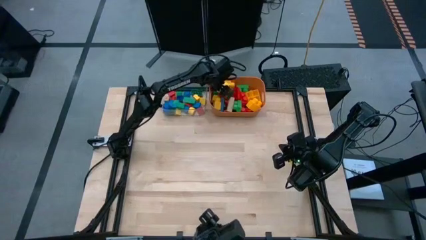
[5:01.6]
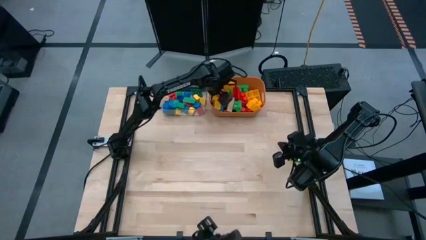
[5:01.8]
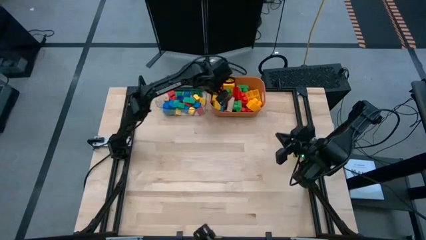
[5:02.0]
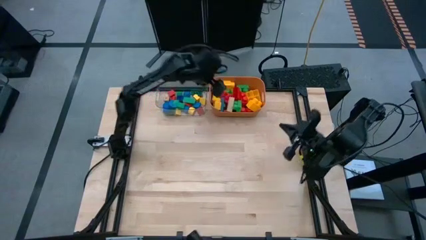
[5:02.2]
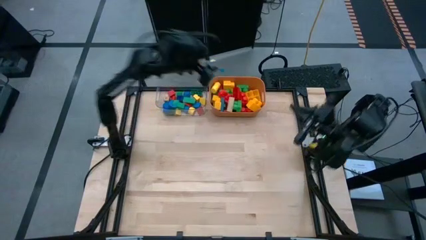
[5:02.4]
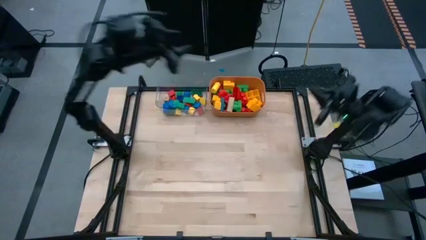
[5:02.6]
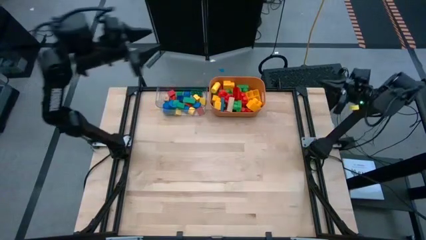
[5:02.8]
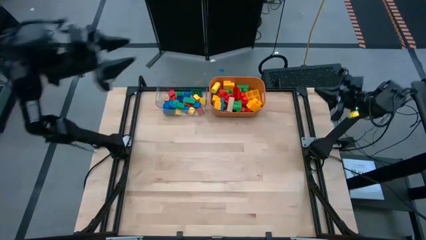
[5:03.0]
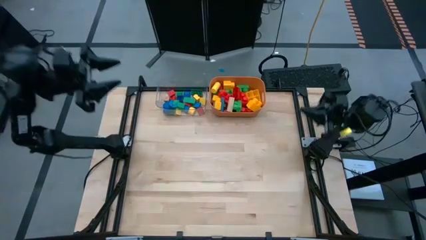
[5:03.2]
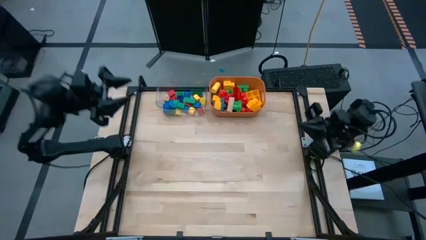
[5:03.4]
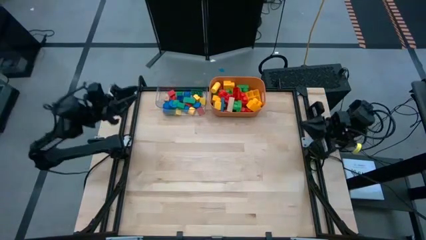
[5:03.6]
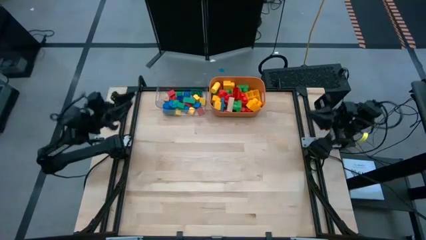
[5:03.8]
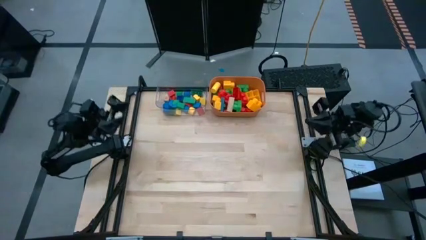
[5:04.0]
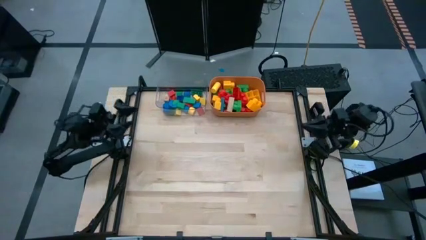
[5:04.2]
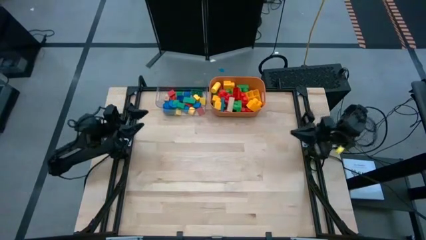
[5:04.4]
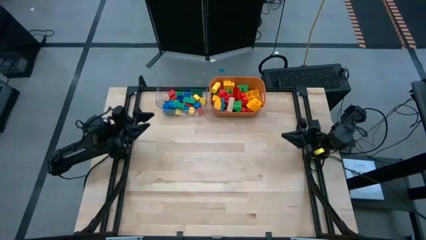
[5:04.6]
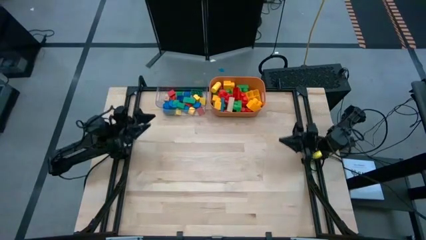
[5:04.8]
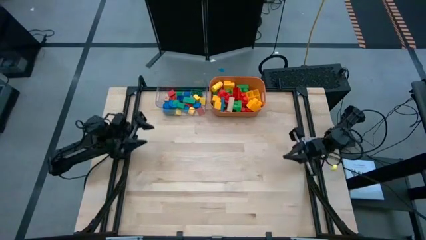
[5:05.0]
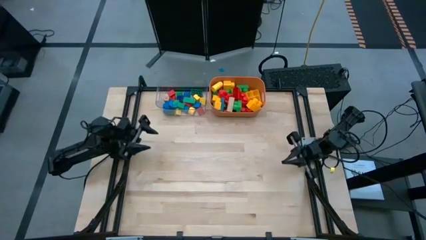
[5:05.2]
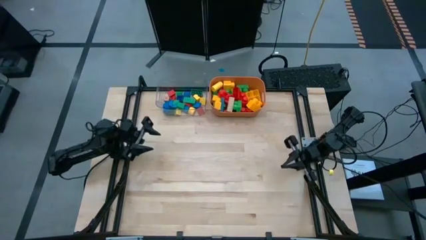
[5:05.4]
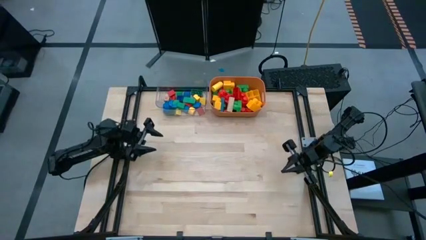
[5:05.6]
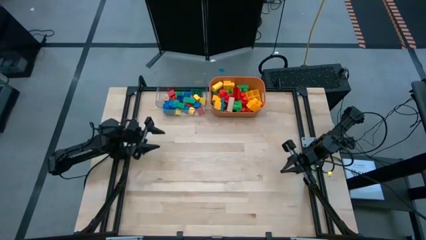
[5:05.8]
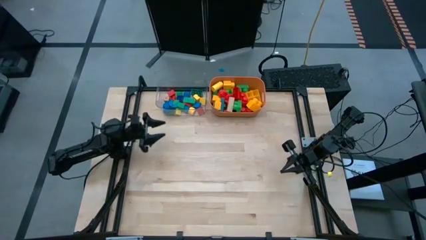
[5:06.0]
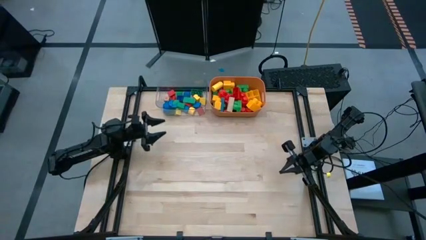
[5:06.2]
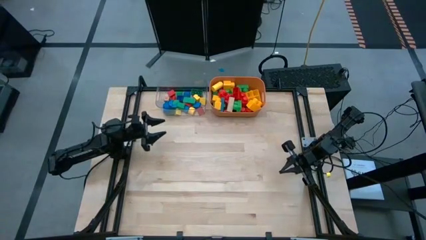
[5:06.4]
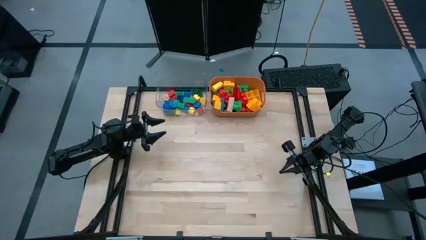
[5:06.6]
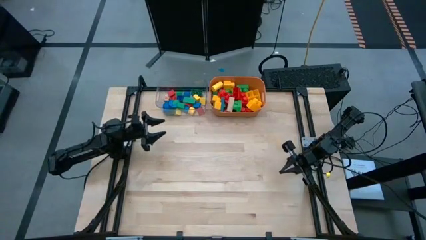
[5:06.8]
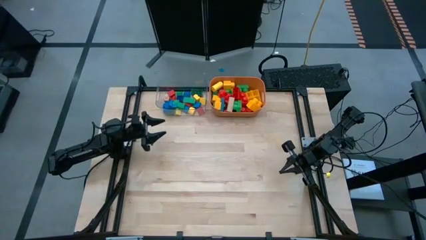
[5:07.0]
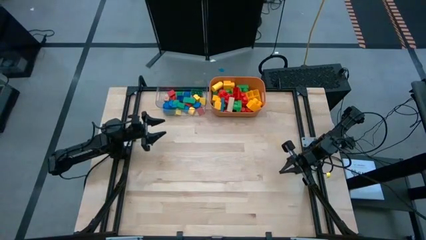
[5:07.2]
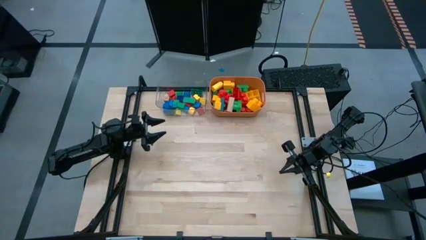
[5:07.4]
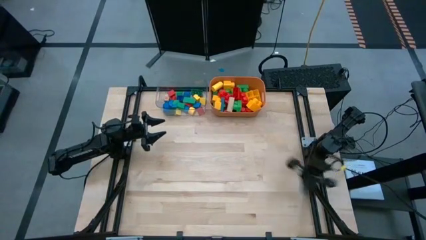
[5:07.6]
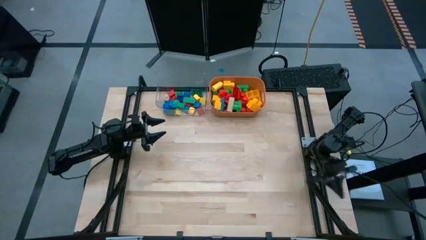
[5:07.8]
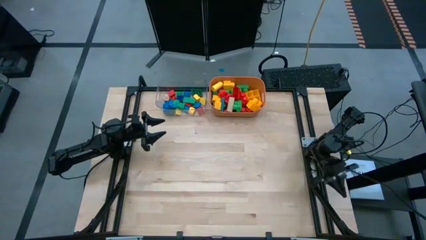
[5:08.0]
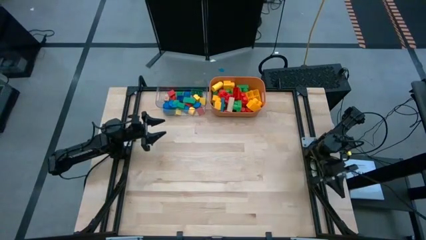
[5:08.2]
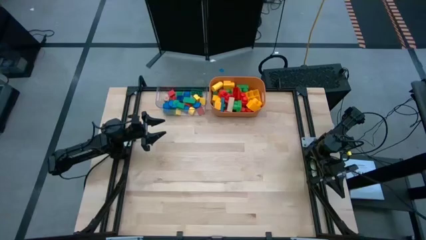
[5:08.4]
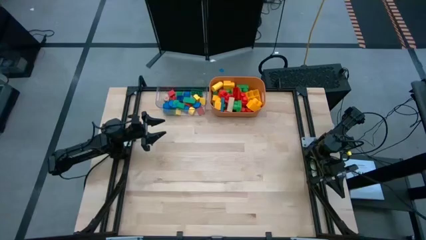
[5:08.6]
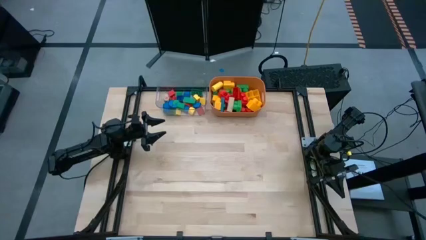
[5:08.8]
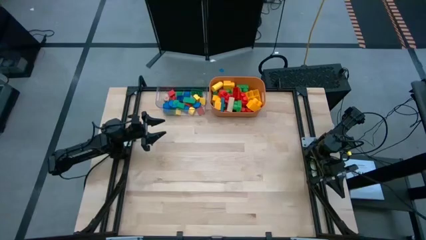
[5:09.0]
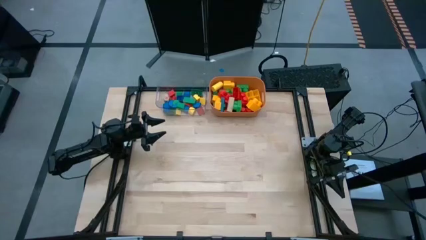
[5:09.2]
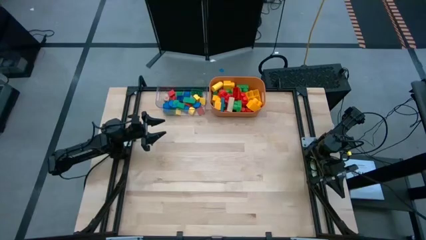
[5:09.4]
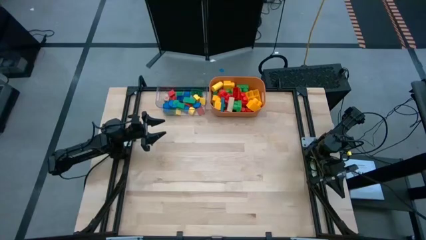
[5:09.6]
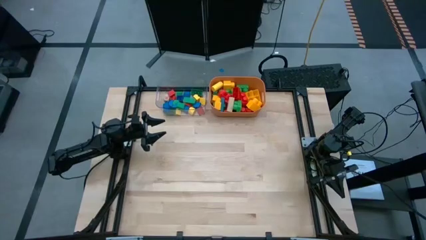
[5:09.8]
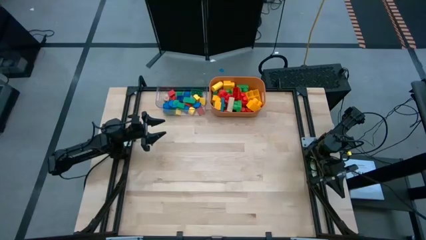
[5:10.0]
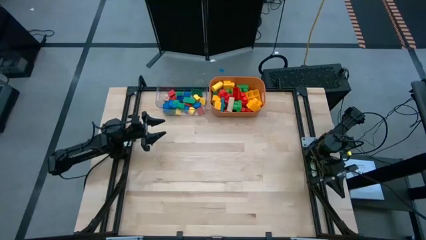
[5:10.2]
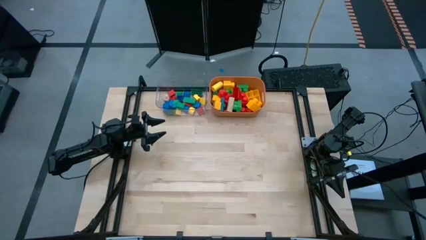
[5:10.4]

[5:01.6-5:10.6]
Task: Sort blocks by size
Return to Home Position

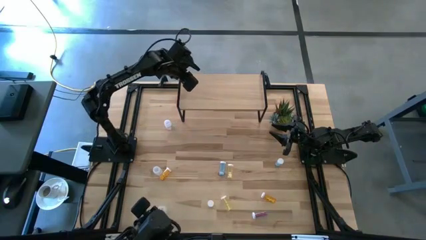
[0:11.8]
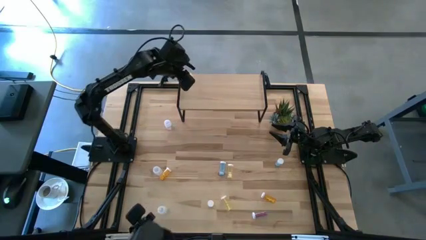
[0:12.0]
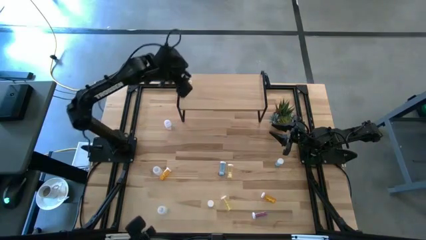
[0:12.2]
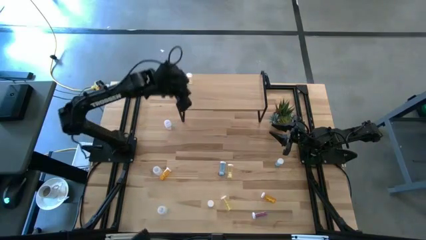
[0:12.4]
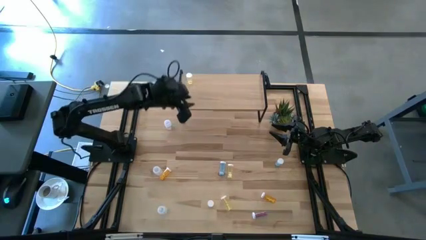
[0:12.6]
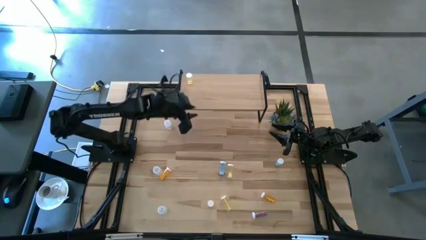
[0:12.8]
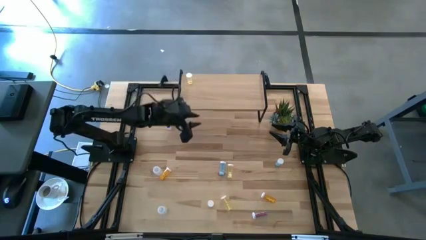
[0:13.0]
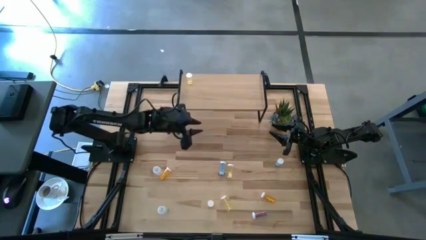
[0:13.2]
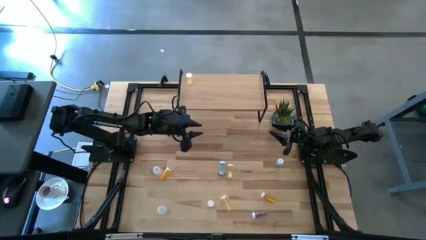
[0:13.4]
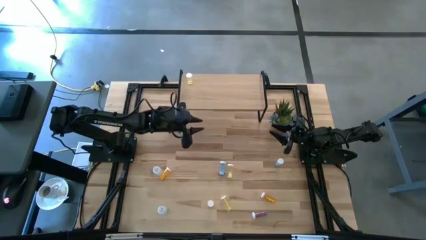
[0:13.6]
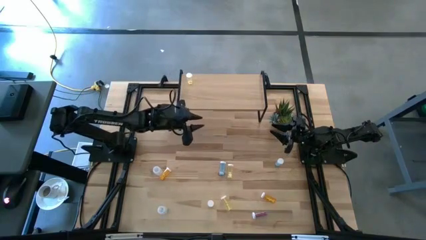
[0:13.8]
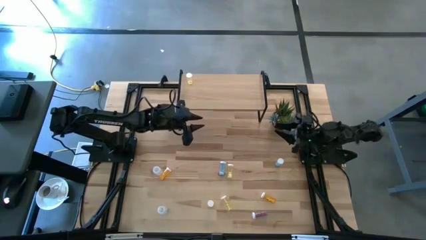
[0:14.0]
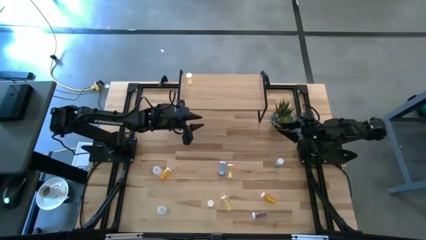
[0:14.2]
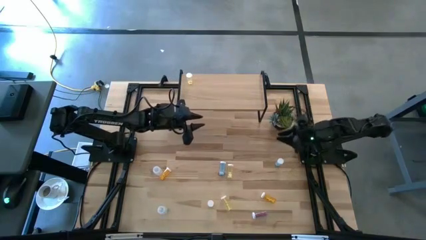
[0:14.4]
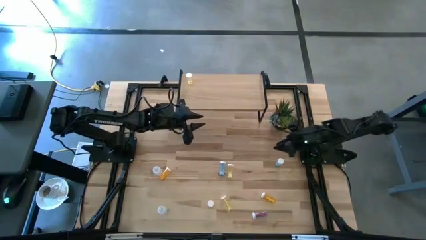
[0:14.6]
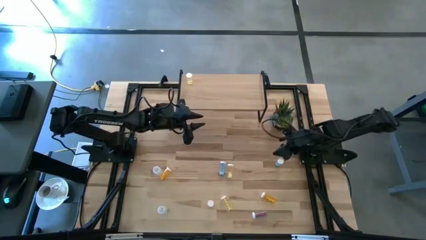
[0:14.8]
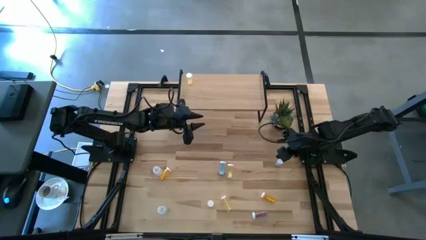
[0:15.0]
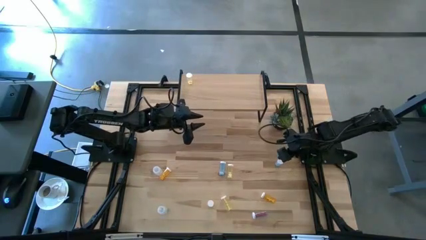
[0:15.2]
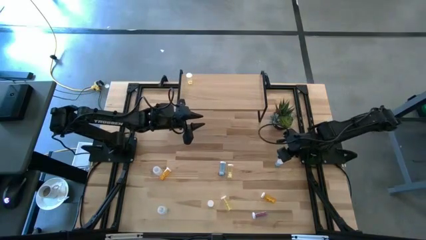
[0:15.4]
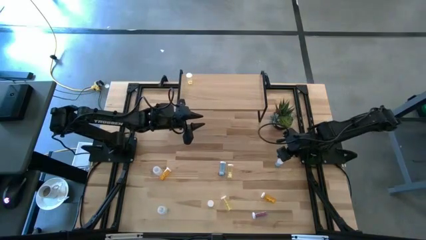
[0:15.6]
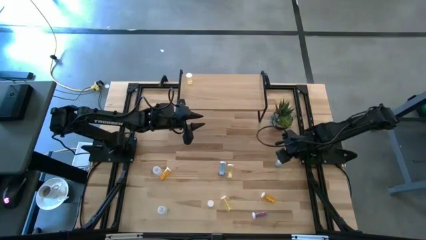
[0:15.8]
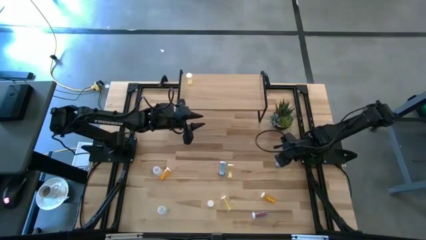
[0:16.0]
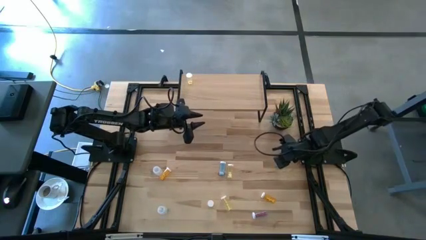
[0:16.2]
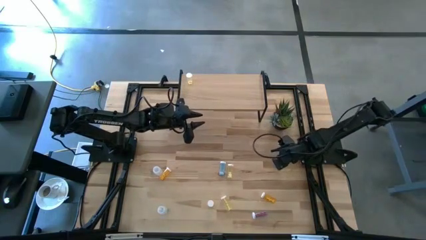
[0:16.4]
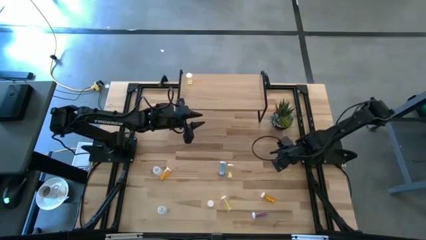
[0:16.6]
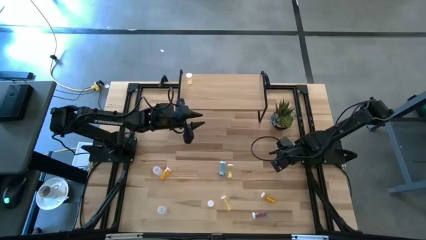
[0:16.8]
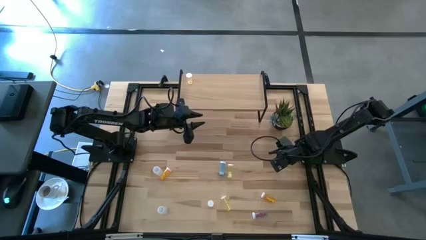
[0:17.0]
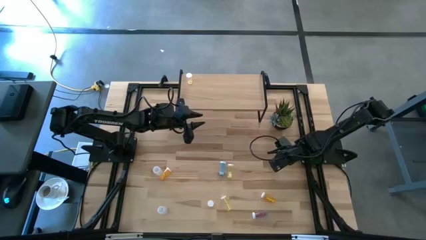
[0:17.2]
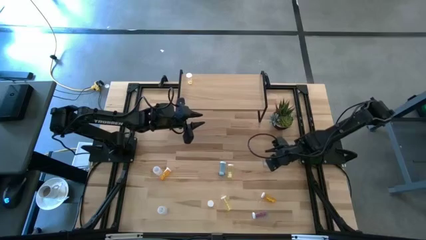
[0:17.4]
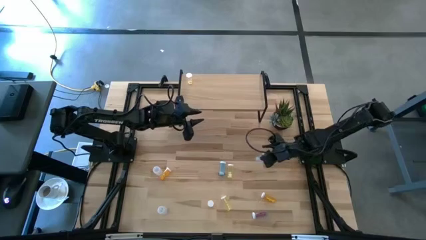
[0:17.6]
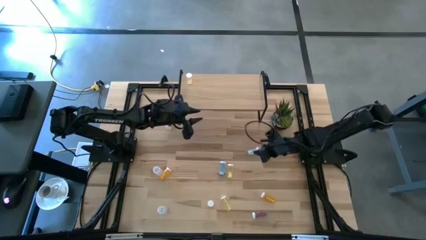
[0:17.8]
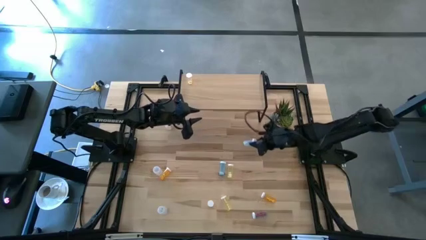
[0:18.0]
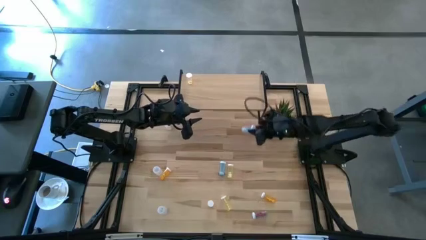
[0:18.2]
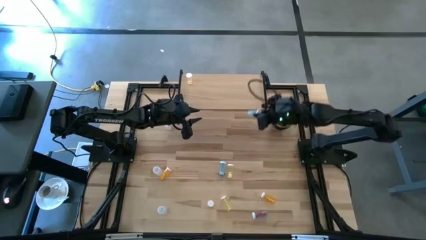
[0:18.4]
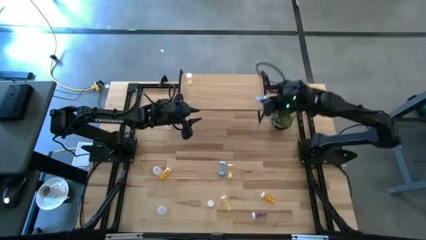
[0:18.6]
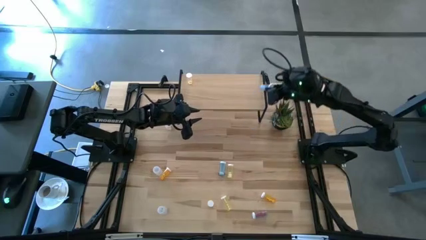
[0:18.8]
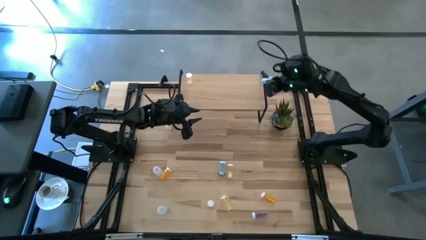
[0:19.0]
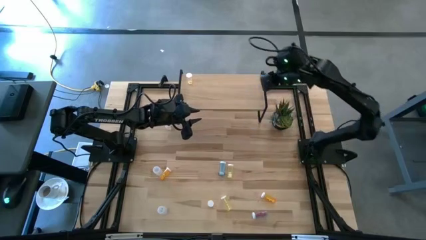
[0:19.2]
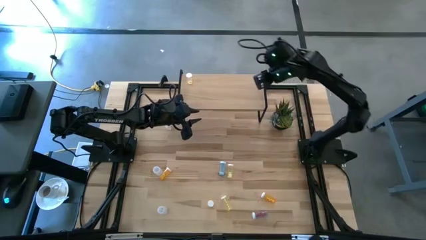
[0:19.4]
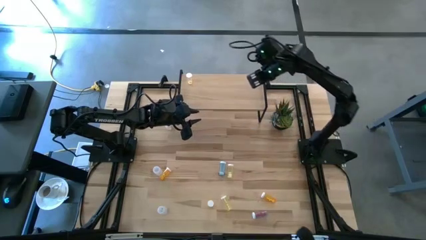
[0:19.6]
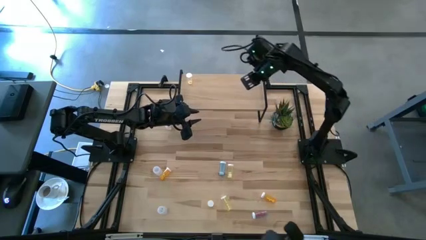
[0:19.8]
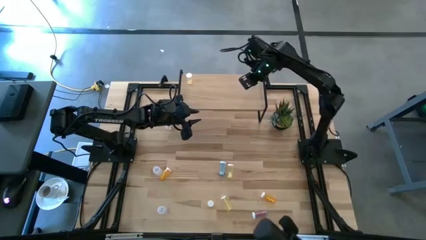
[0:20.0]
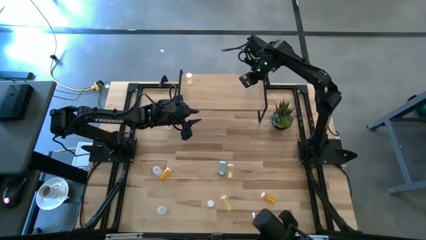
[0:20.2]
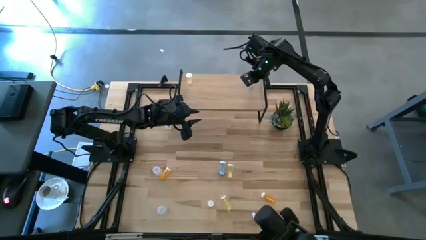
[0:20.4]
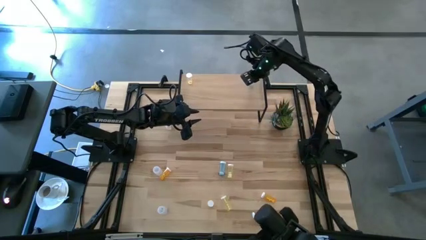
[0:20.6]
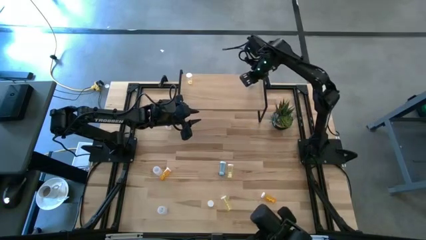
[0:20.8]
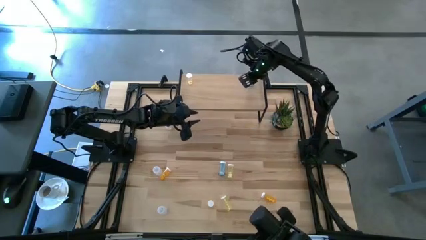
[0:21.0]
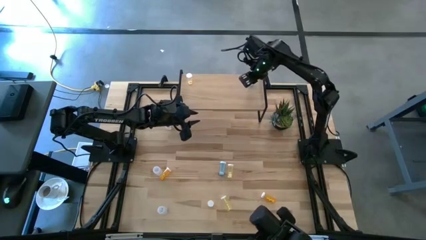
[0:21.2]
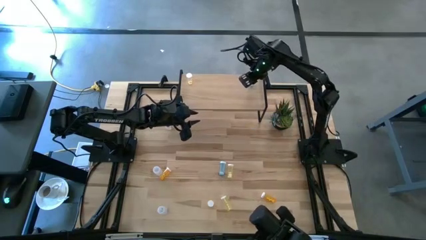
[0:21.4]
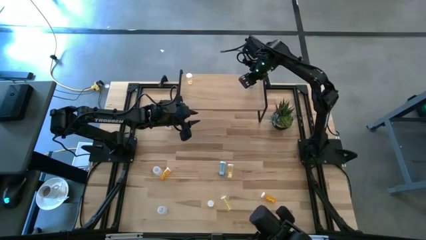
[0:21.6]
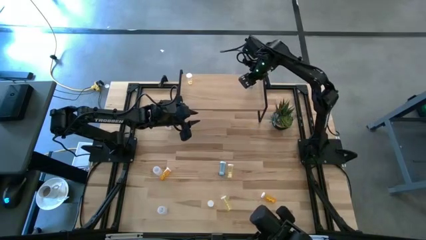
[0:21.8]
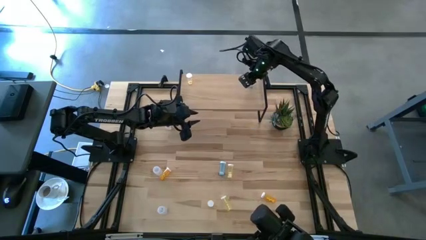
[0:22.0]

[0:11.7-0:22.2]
Task: Pick and place medicine bottles onto shelf by color
Put the top right blue pill bottle on the shelf
